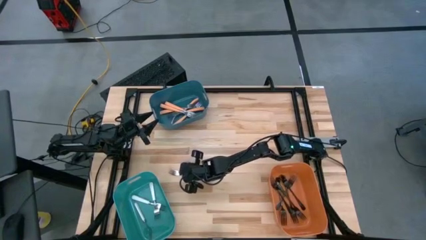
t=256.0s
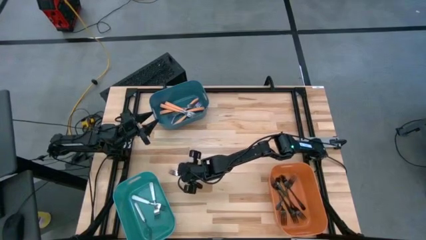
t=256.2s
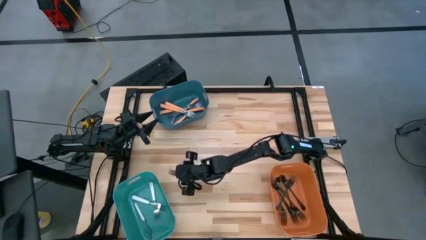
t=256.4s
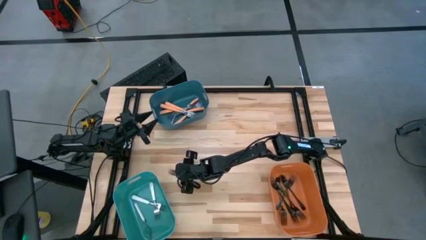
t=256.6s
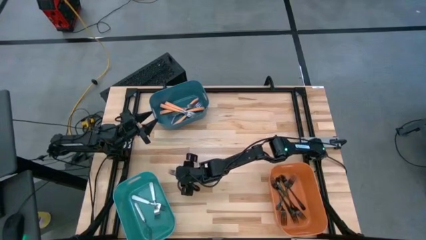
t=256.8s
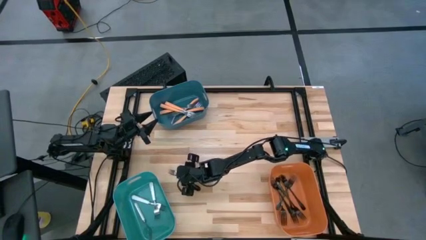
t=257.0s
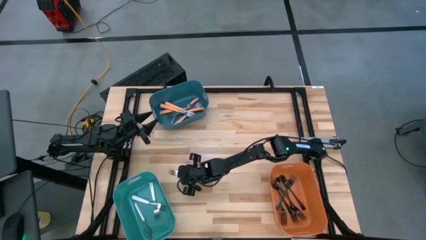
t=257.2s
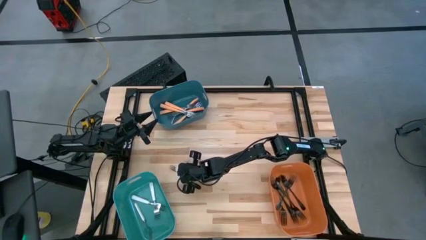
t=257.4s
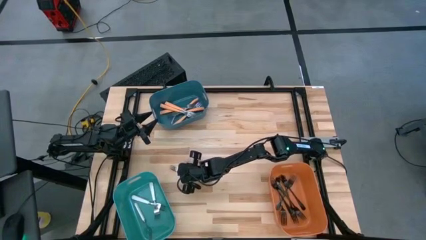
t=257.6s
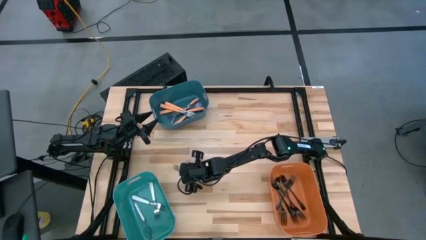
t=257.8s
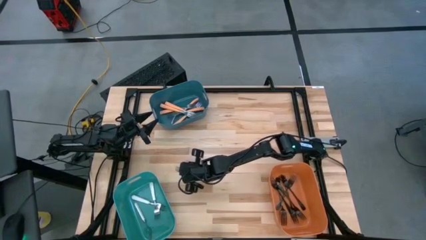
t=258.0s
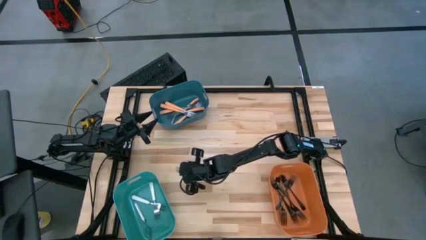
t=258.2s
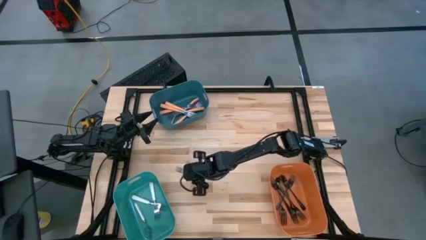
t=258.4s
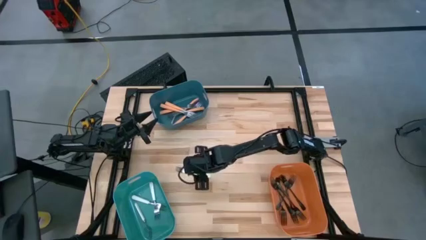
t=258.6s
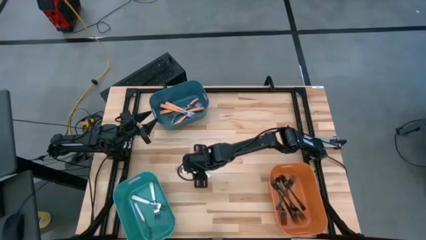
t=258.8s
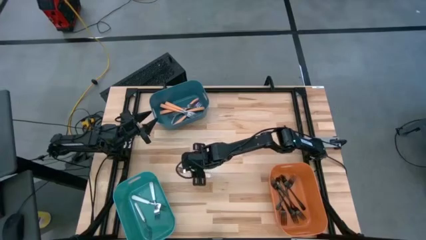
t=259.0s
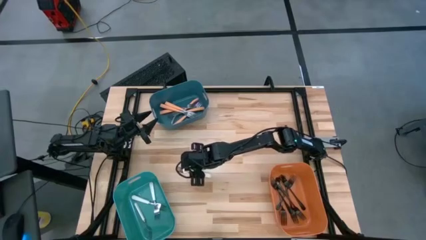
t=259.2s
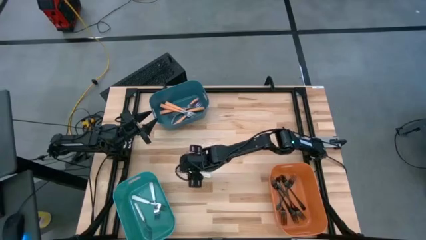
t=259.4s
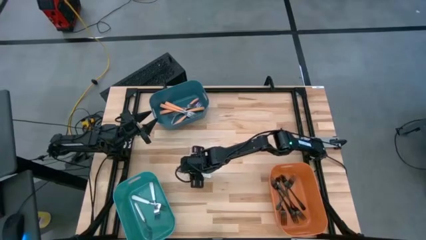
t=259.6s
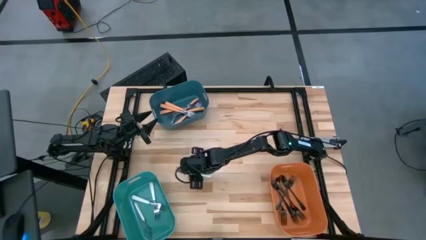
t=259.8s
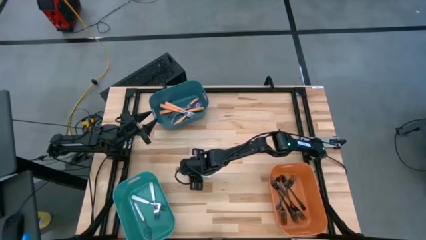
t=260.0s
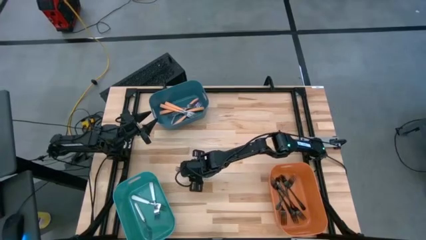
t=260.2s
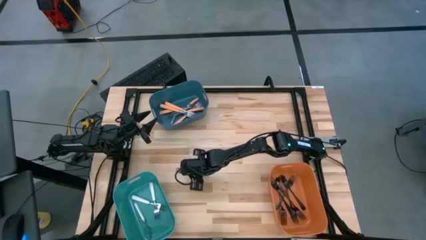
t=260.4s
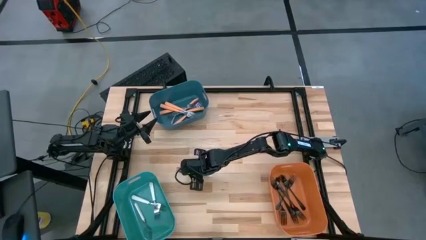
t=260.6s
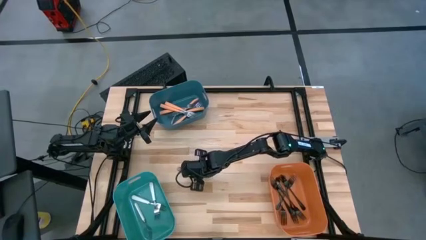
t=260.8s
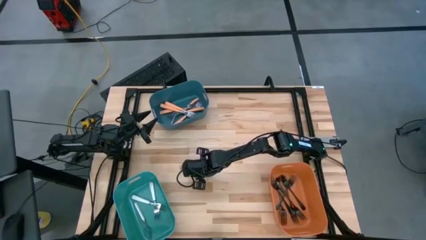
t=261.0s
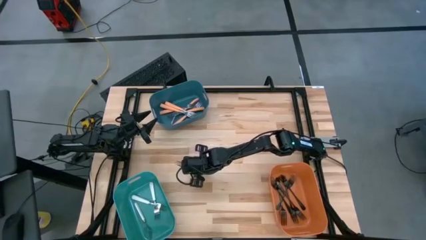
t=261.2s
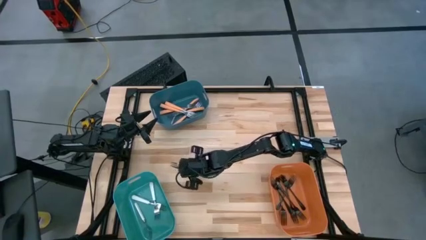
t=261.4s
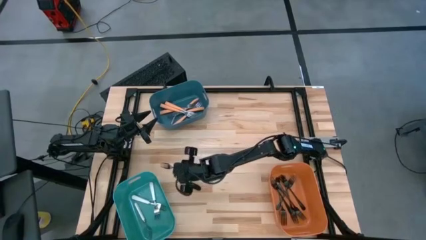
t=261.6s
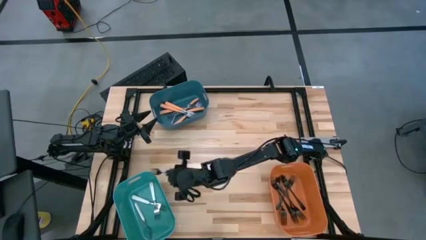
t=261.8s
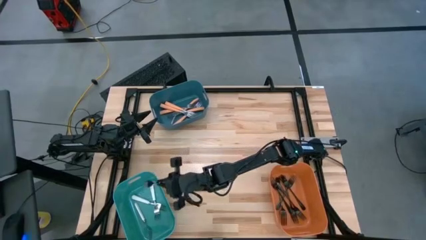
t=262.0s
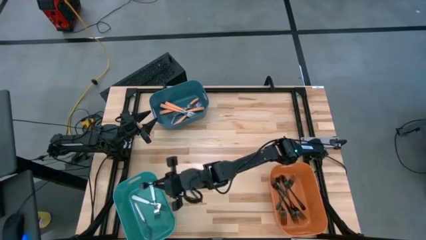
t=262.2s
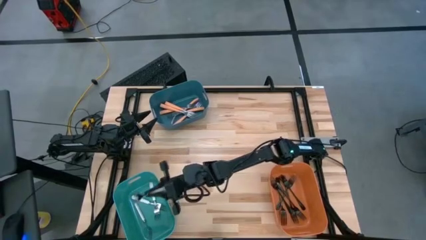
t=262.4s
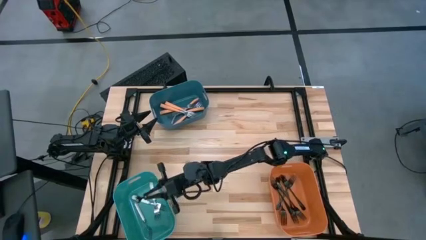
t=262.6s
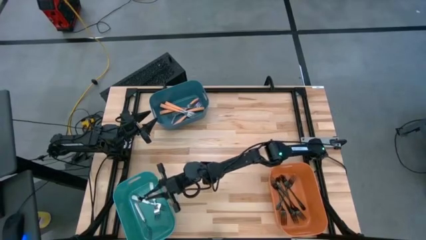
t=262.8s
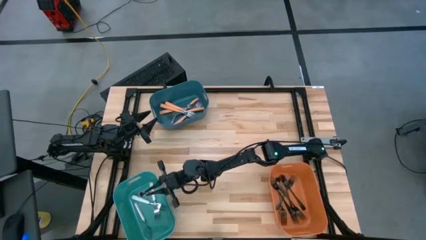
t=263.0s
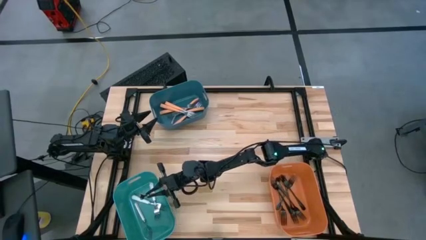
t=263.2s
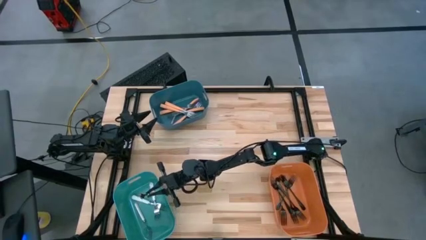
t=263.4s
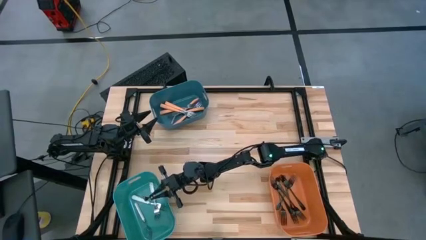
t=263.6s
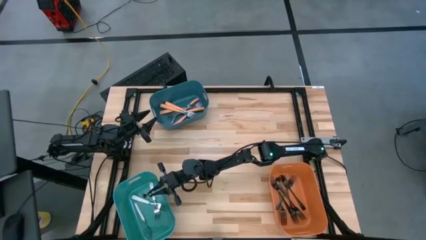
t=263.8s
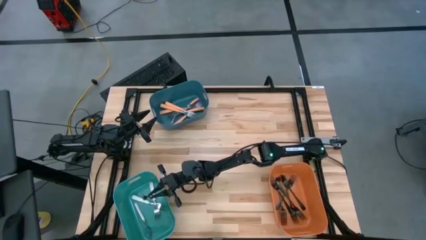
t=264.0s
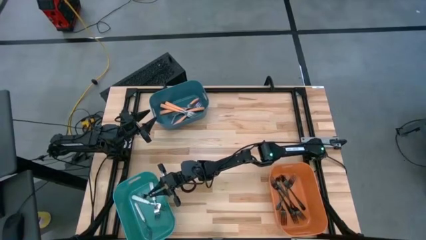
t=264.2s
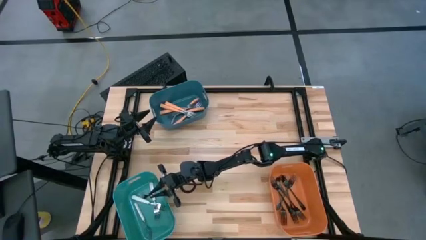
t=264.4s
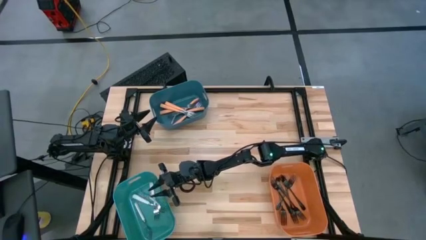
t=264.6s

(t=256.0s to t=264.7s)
Task: Sort silverware by color (type)
Put the white fork into the green bin

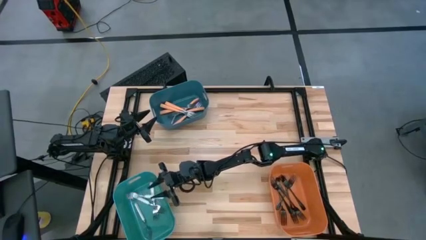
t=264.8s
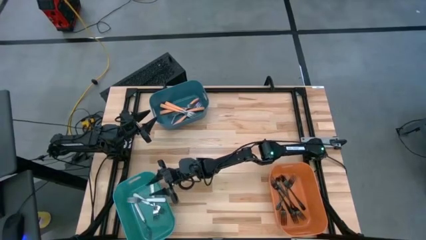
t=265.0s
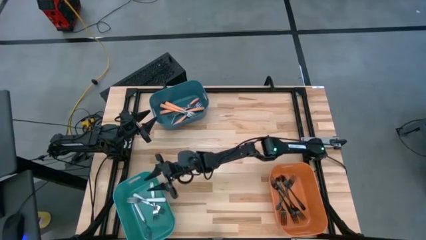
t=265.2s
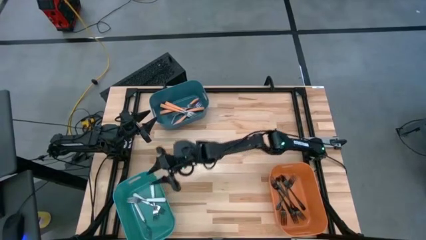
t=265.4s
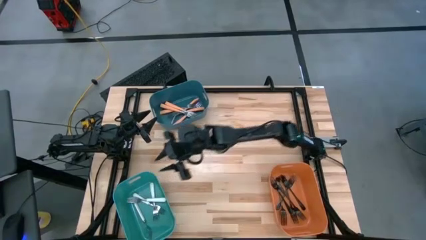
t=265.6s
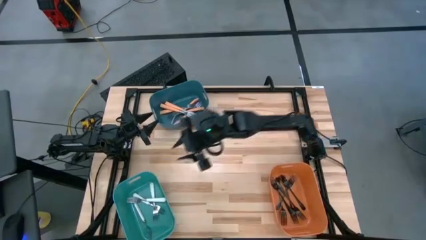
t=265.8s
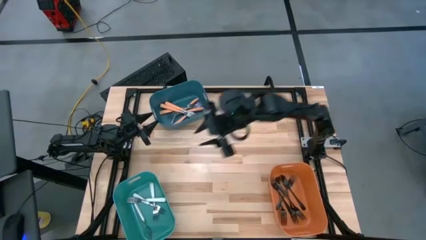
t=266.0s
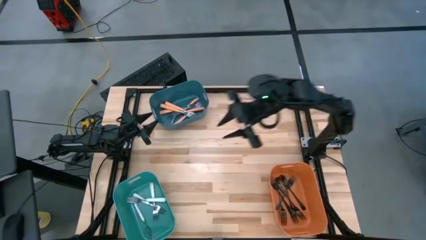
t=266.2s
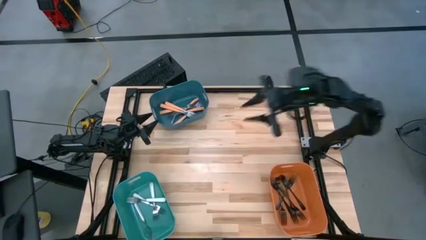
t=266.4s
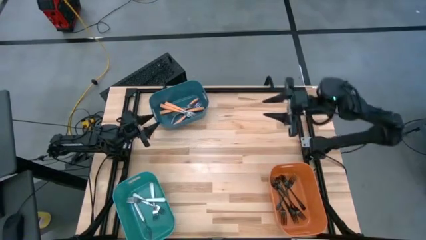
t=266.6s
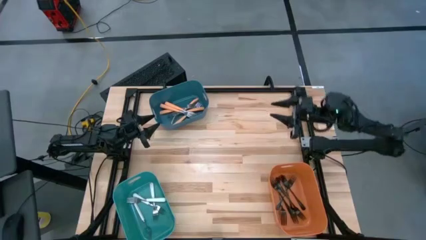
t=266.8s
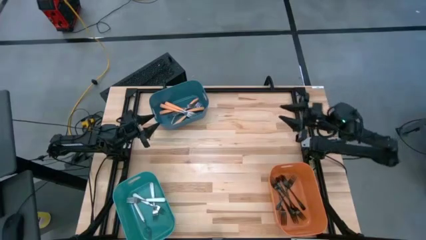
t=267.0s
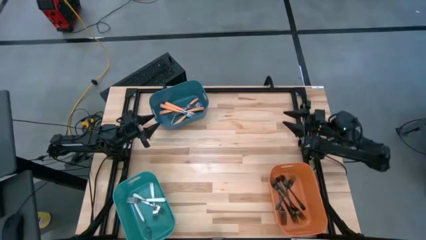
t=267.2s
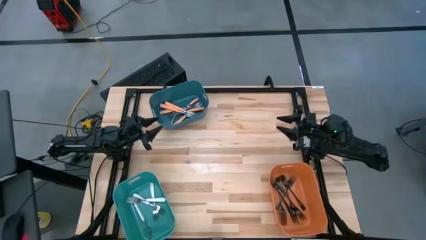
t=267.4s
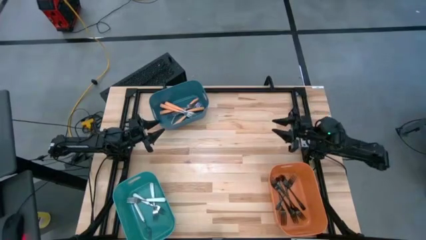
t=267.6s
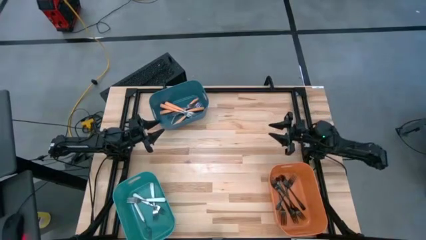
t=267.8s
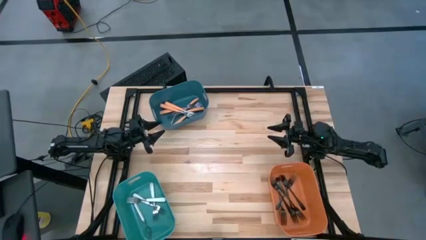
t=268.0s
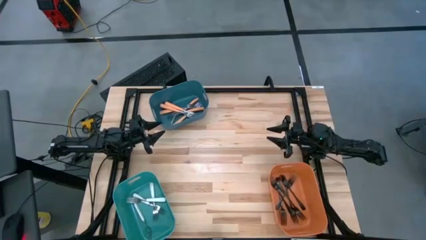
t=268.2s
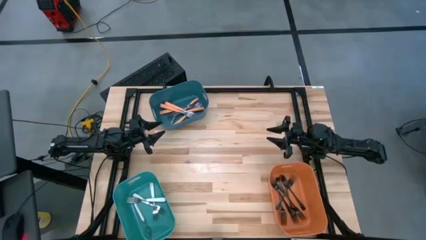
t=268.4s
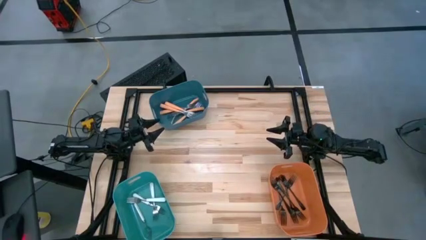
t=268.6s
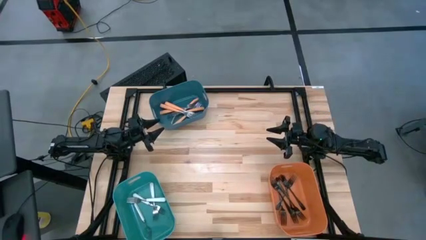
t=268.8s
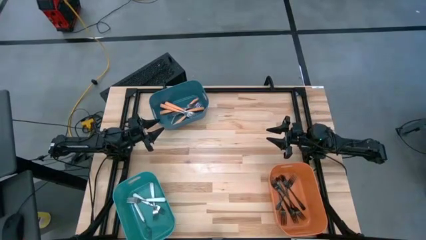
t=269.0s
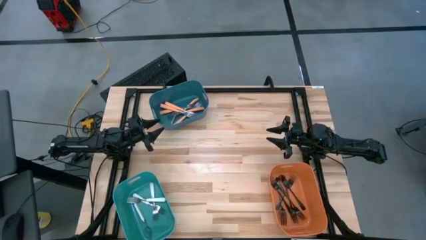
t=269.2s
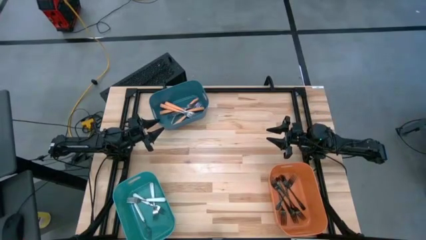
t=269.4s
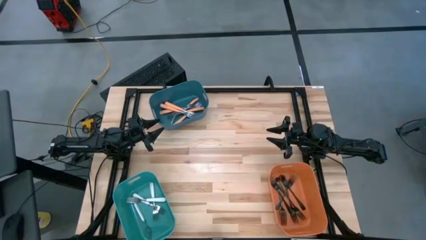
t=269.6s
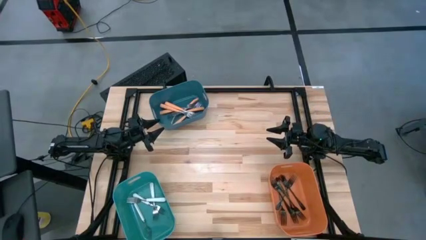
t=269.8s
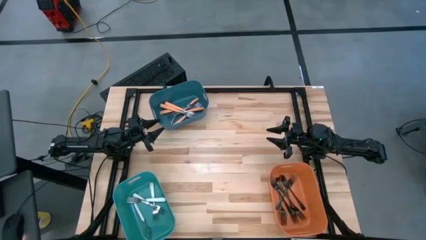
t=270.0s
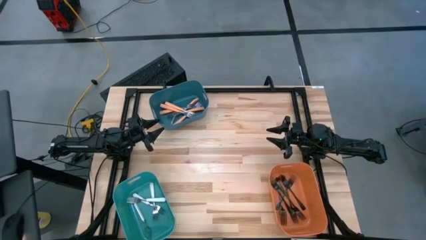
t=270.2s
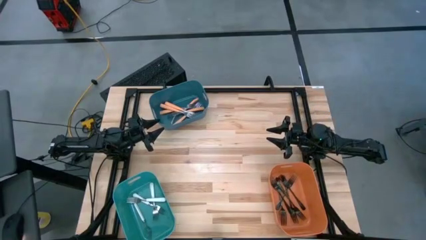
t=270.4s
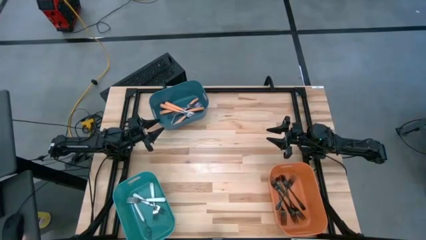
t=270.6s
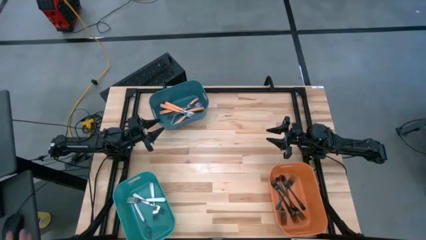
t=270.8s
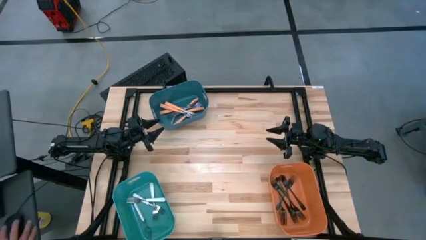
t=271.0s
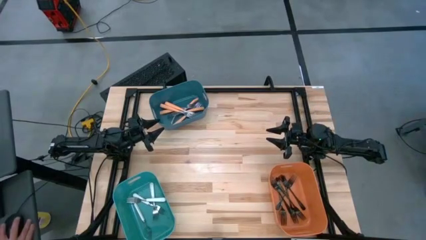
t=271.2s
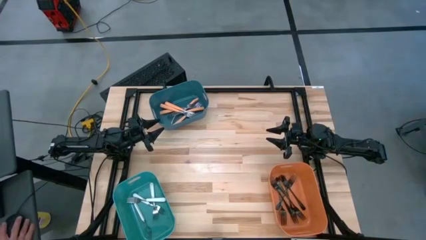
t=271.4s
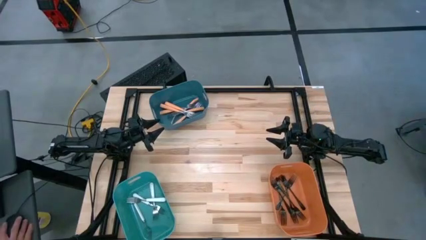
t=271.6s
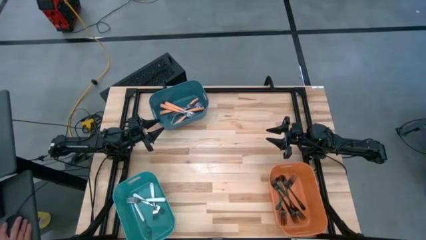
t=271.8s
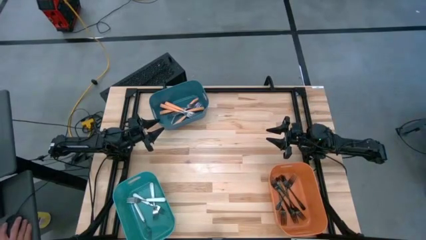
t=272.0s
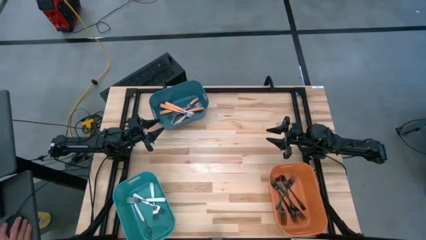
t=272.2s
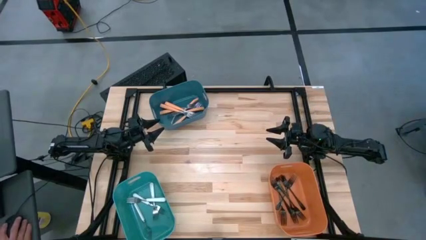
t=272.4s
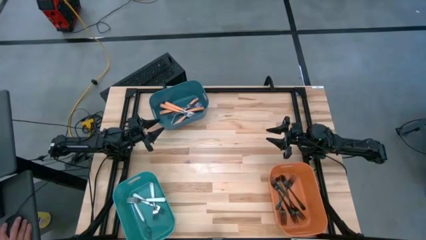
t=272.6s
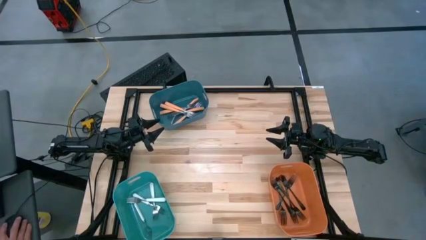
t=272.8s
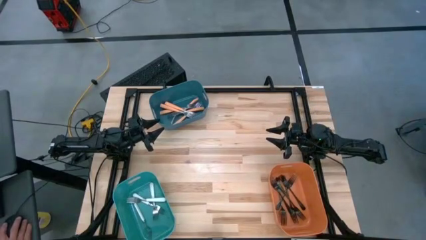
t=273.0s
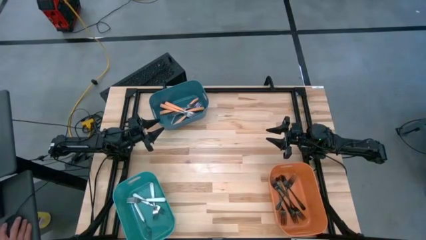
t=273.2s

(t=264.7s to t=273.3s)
Return to Home Position
